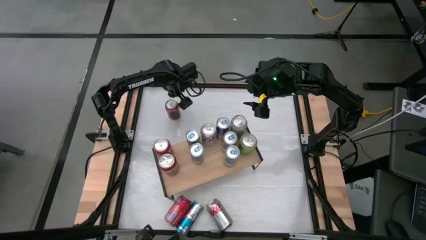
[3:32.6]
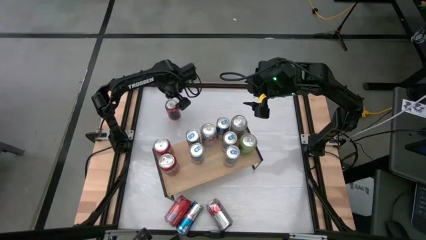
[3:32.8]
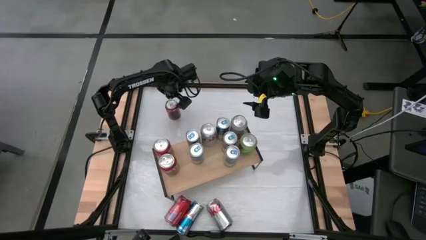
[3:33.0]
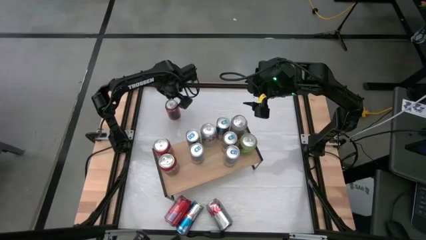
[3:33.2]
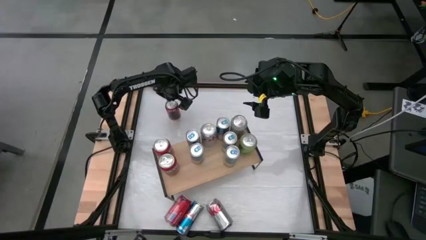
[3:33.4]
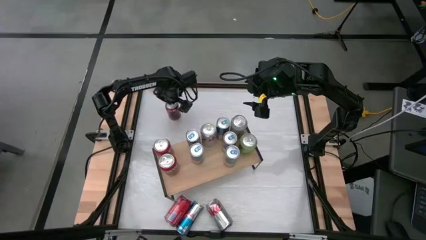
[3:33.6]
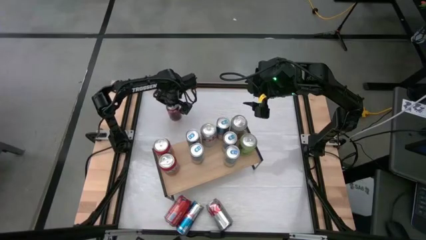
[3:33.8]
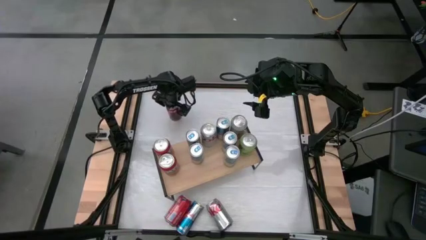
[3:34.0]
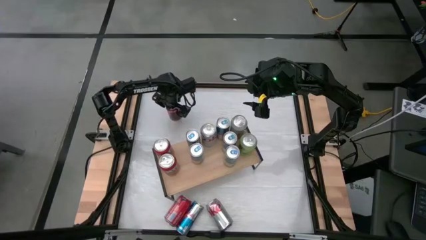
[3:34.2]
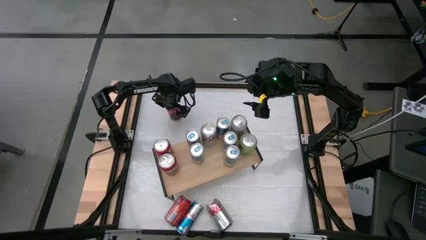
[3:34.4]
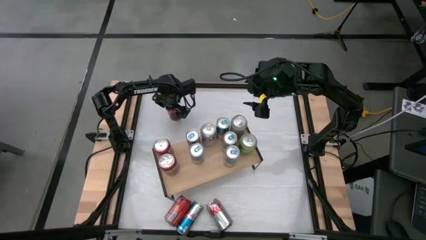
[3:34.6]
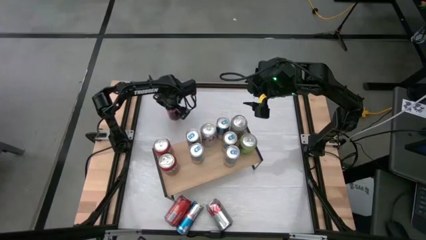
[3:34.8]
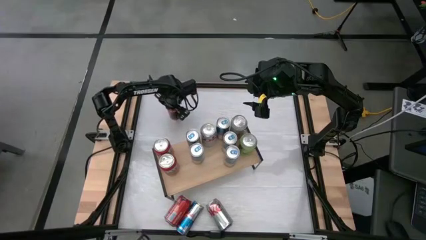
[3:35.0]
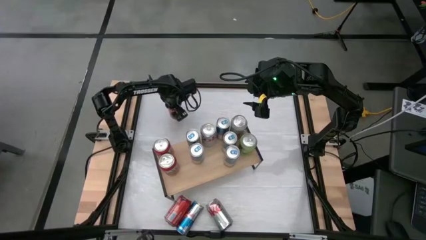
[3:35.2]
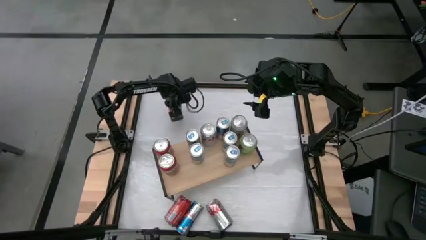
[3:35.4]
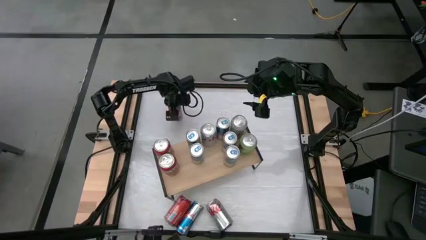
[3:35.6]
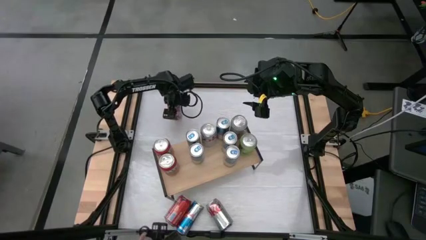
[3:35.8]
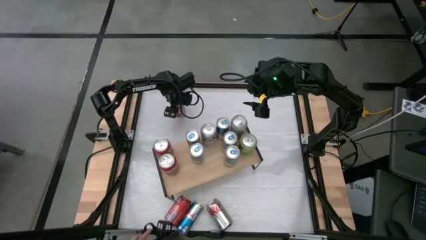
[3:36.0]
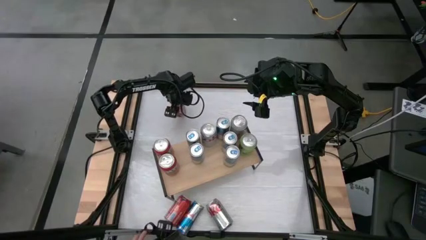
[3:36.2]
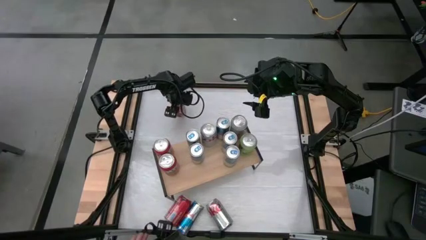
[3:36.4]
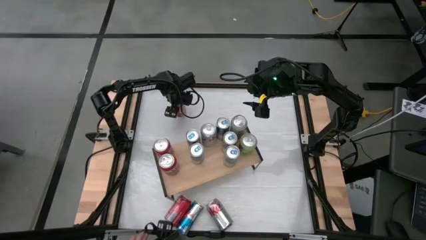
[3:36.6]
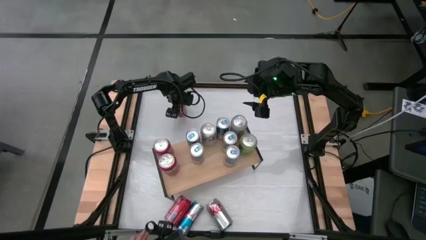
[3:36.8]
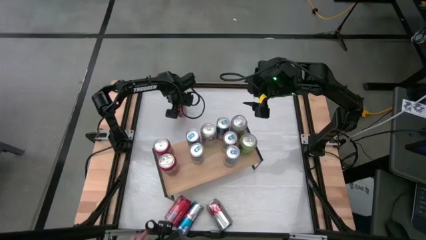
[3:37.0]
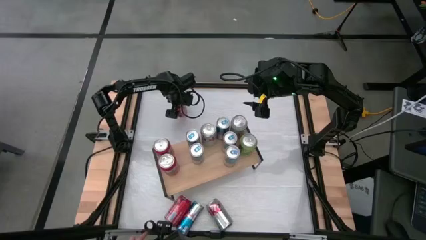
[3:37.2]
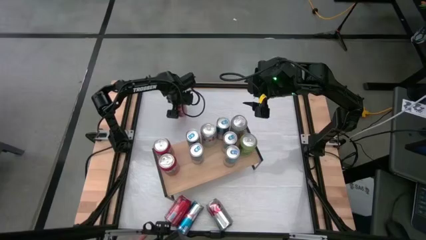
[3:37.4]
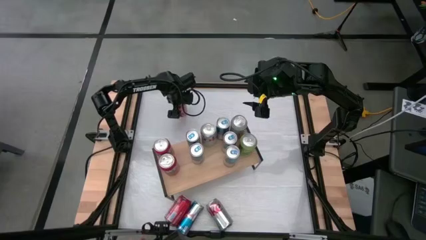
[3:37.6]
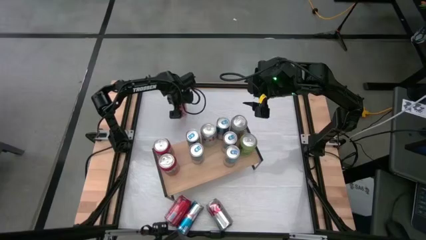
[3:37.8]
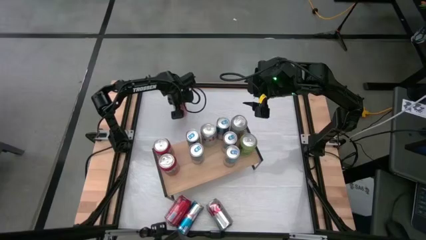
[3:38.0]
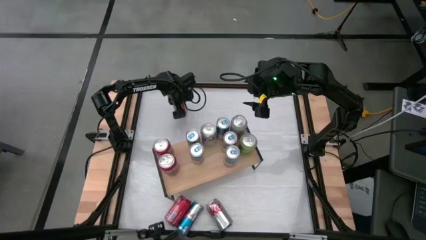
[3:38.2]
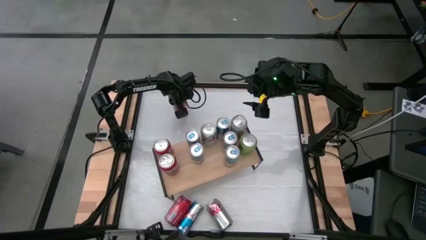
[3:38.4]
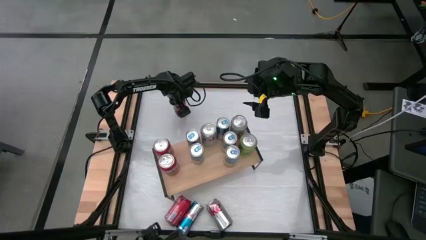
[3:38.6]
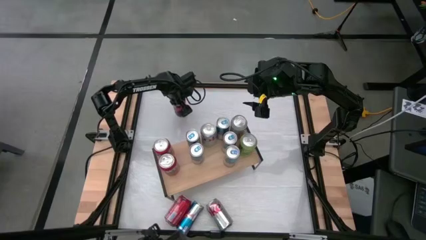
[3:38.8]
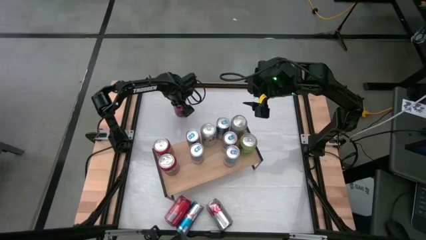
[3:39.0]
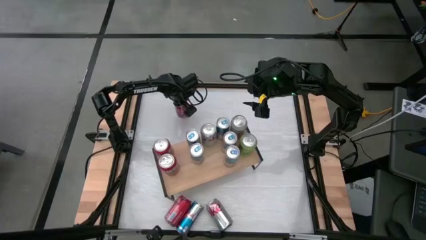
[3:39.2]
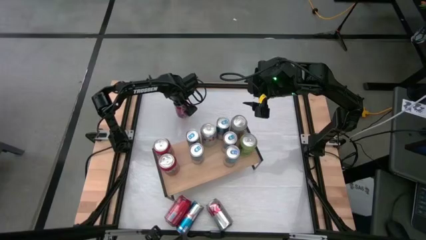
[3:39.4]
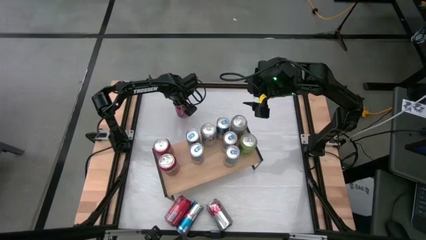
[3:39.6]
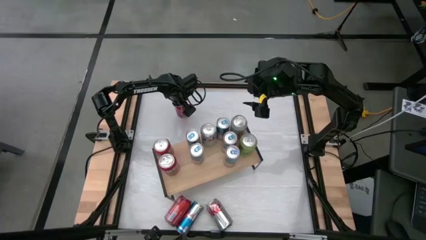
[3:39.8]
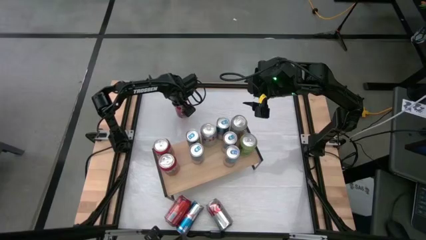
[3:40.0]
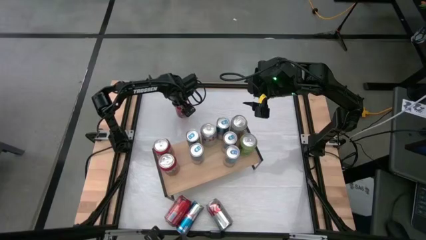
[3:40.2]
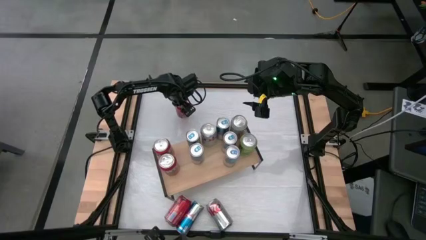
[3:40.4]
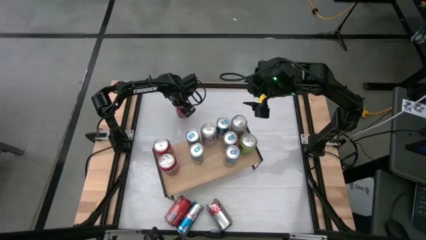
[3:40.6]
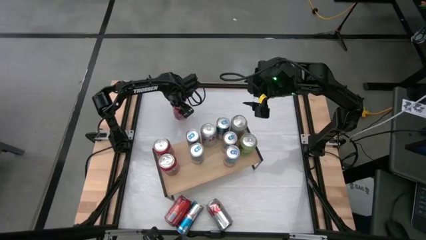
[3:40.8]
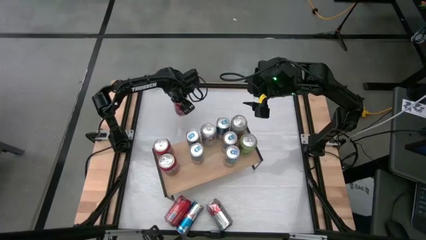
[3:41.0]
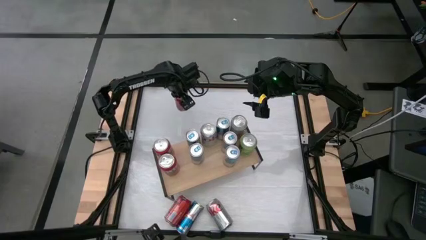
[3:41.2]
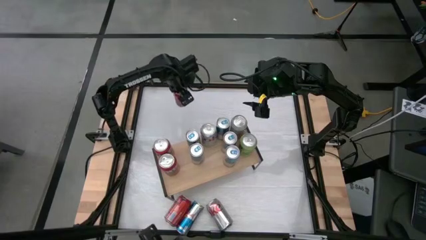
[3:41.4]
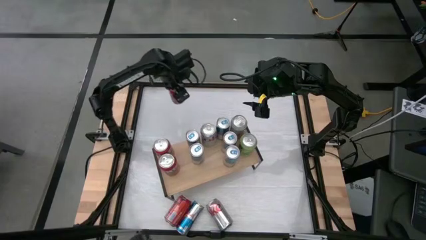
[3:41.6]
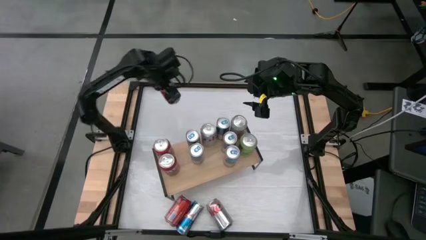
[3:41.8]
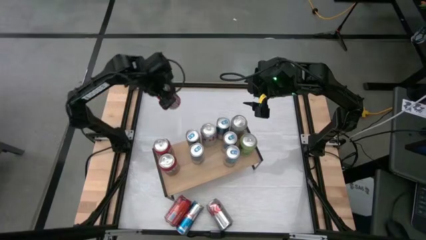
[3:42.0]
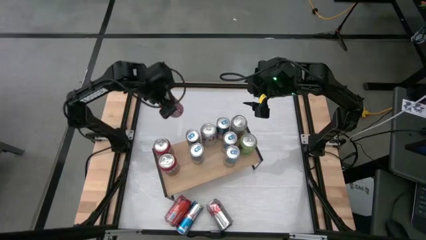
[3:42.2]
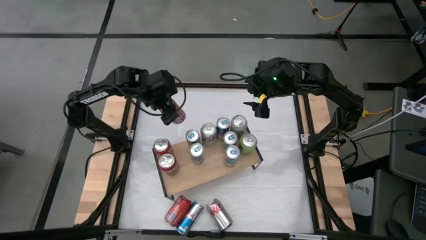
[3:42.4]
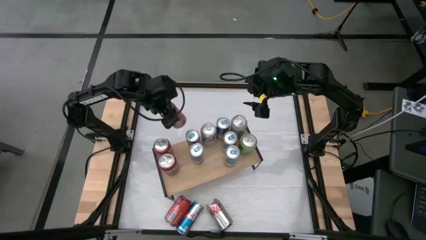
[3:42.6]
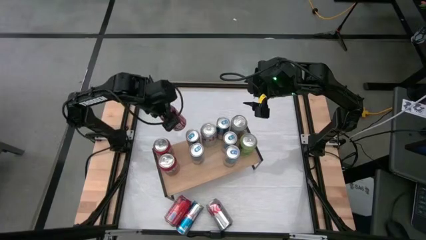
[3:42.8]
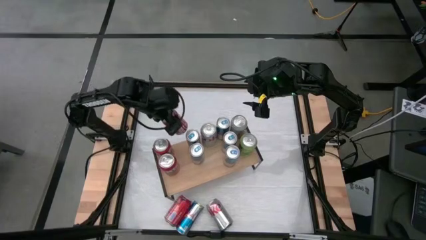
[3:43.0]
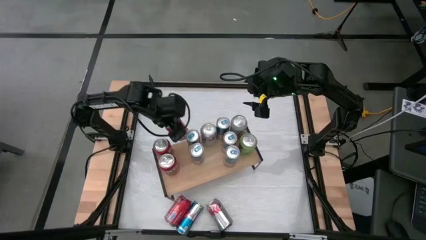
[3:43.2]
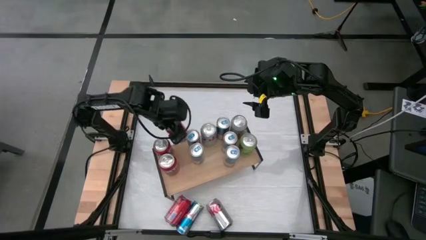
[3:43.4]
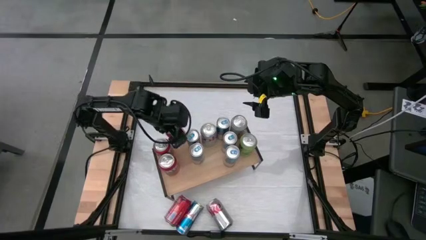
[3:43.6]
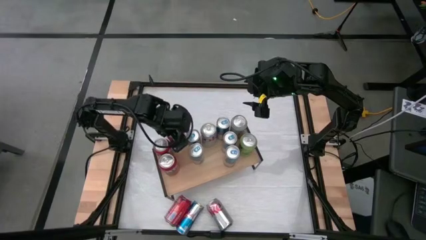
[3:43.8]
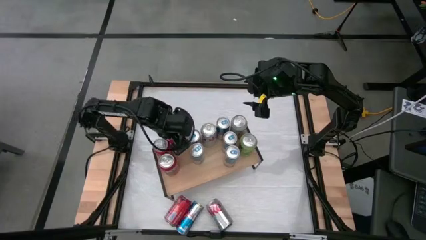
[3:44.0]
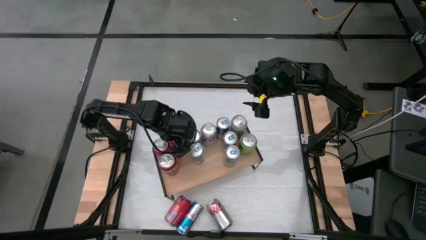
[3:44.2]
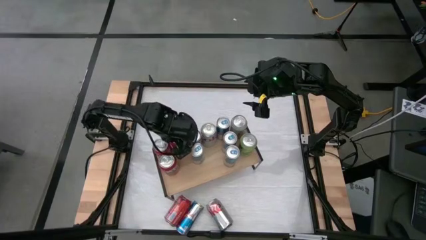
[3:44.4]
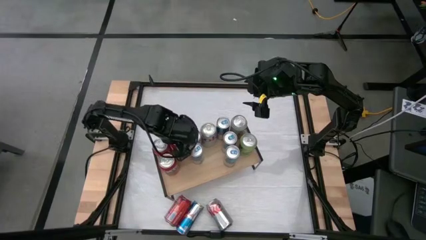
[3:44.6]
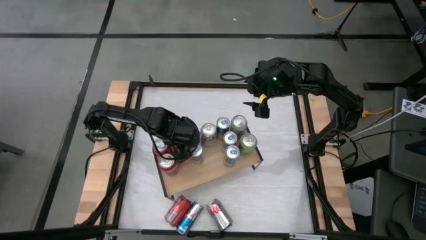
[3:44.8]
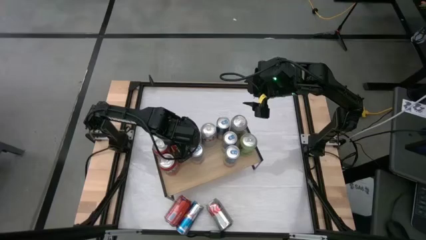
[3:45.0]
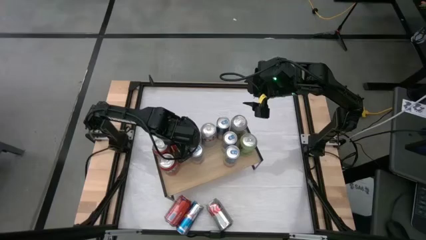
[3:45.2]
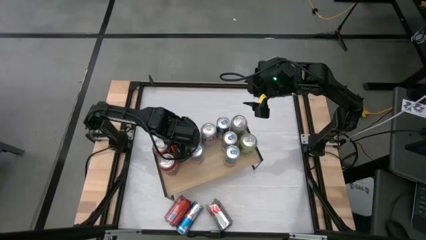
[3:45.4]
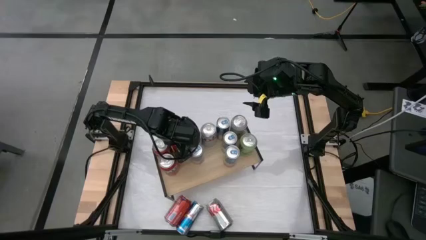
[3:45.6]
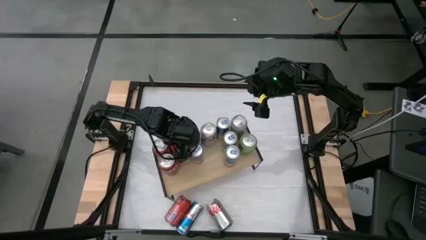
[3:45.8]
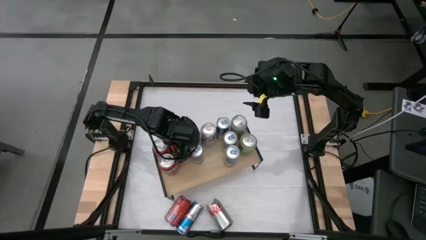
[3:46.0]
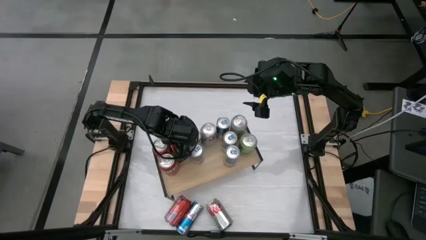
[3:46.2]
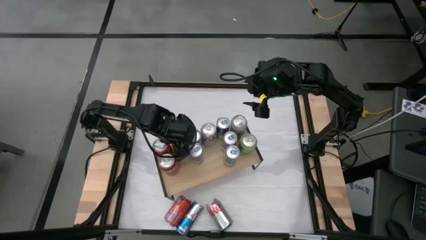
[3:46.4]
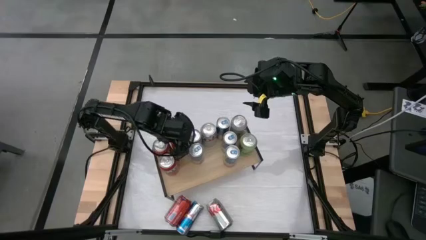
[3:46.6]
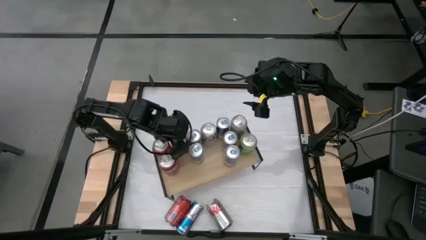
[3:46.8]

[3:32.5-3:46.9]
Task: Place canned beverage on shelf
Put the red white soda can on the shelf

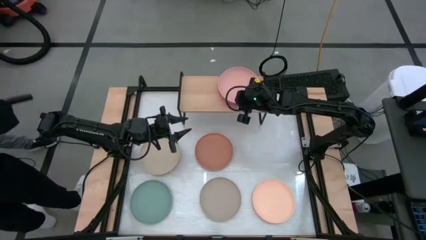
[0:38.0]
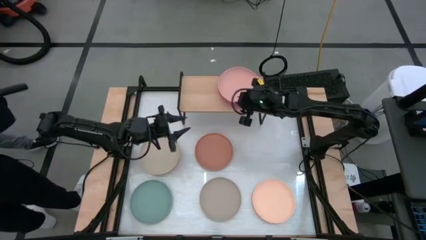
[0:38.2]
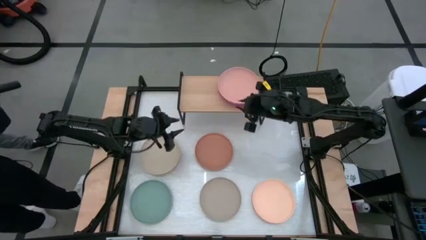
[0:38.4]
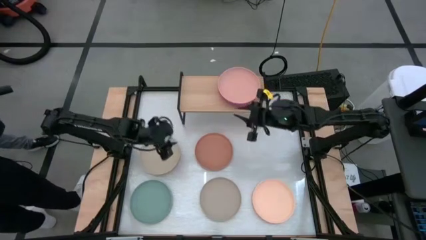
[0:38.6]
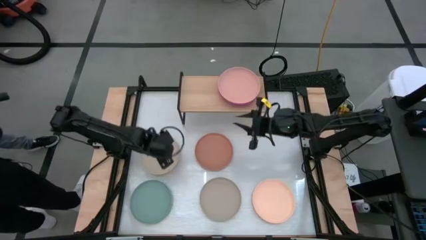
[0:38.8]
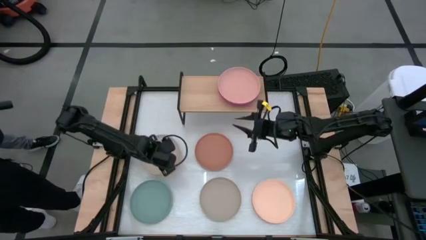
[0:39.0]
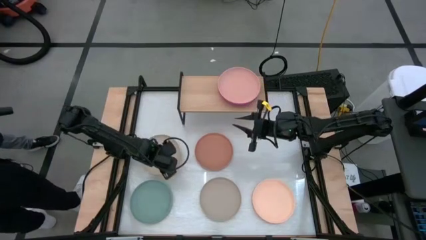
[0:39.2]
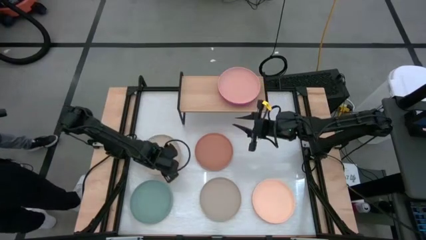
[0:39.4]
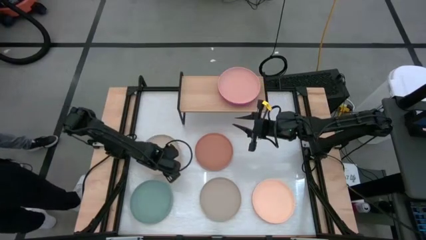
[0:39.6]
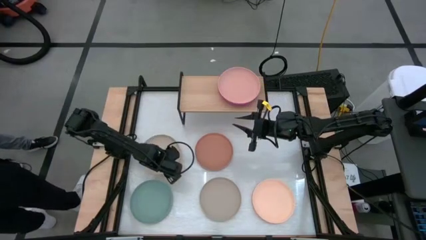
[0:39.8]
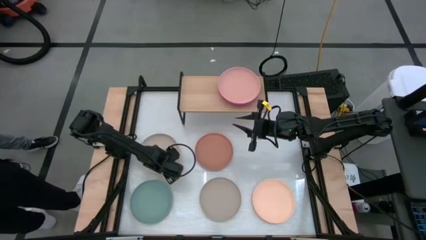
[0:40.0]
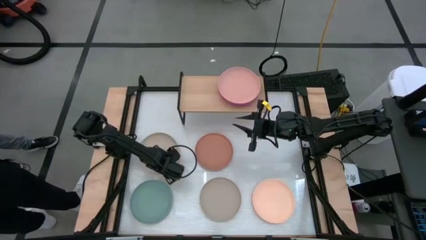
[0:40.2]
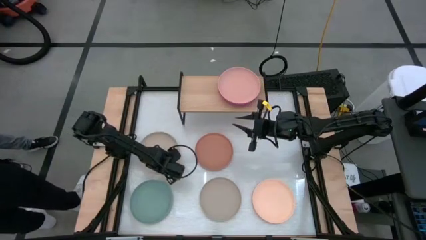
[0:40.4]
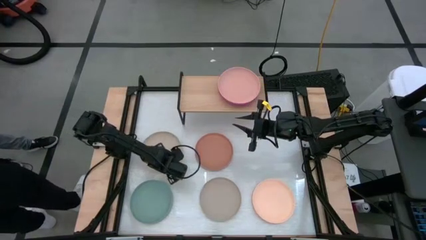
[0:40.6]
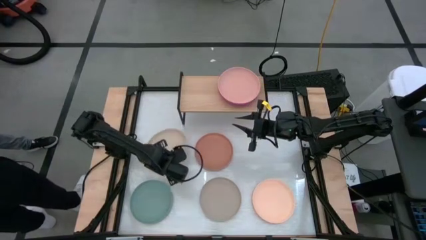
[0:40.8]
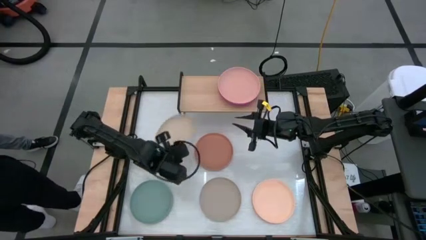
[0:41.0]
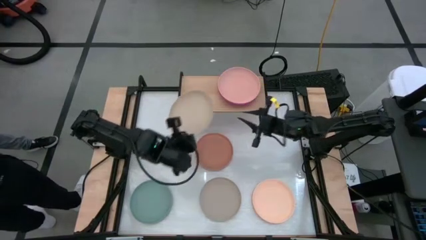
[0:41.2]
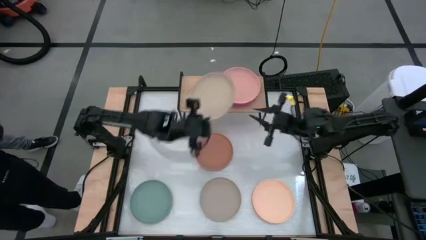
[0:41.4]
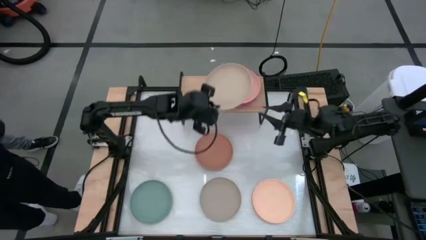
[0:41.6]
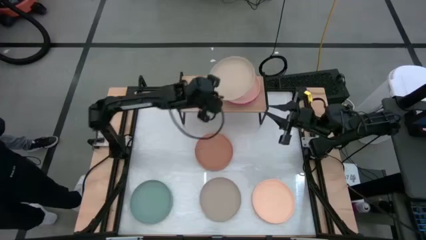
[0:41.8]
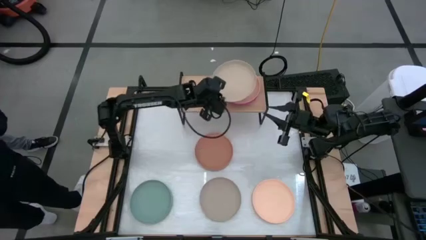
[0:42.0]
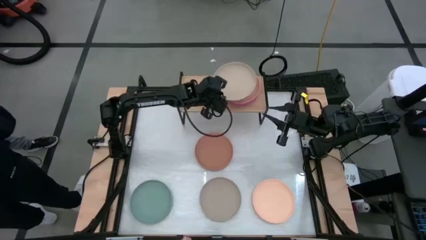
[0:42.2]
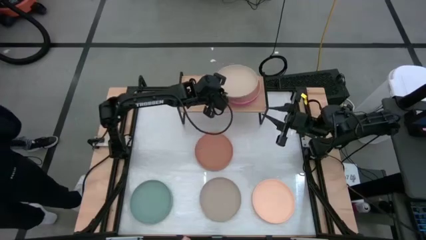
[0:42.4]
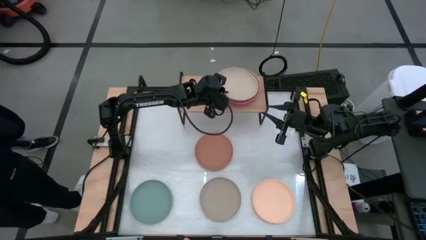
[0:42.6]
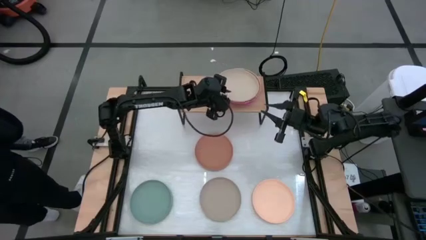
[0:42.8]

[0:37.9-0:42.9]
Task: Place and stack plates onto a shelf
Stack the light gray plate on top of the light brown plate on the shelf
